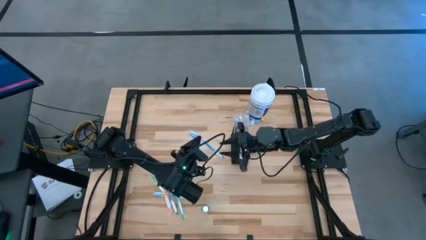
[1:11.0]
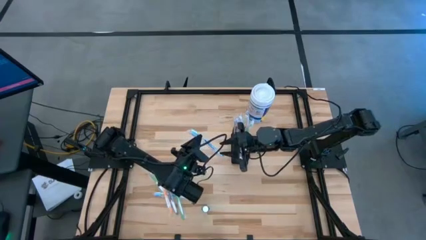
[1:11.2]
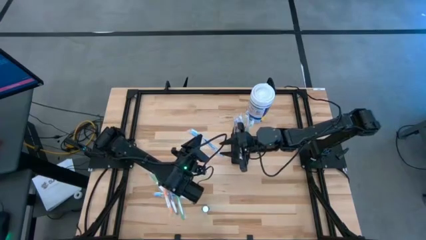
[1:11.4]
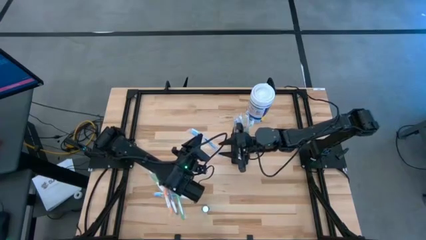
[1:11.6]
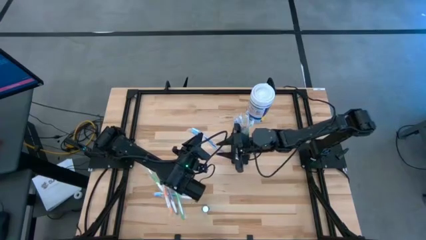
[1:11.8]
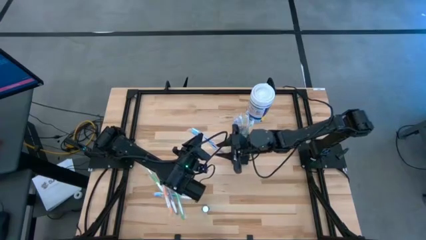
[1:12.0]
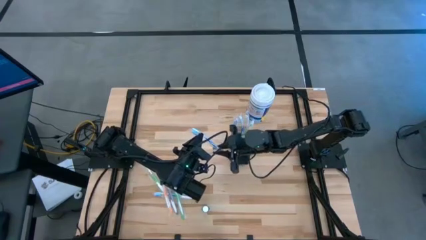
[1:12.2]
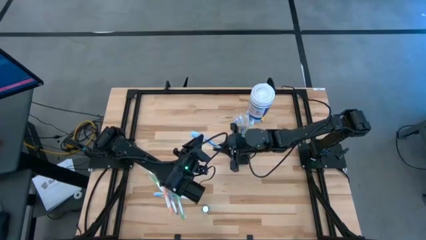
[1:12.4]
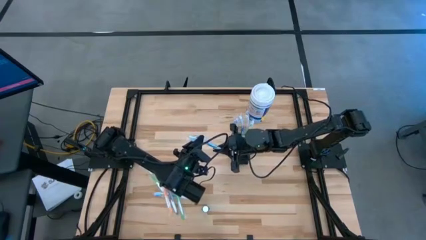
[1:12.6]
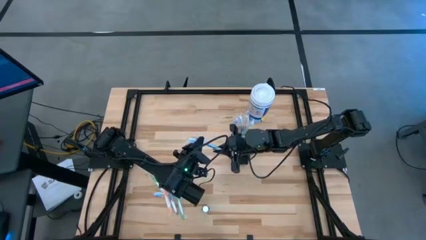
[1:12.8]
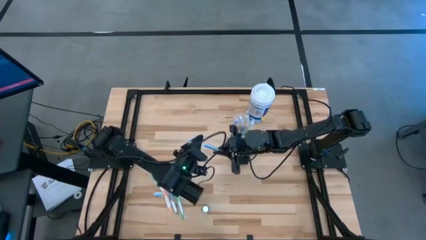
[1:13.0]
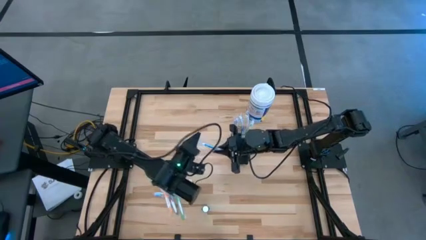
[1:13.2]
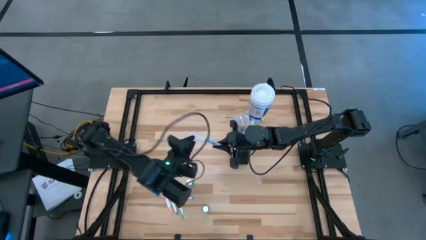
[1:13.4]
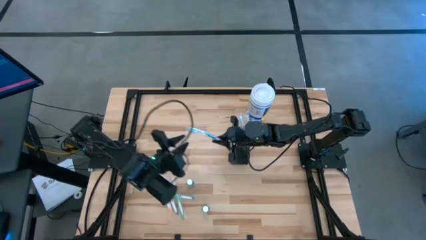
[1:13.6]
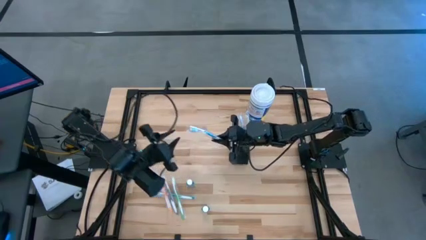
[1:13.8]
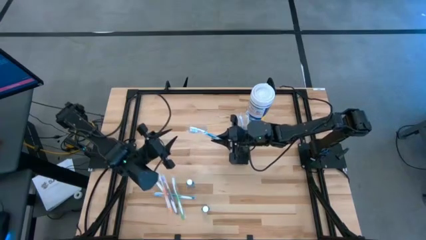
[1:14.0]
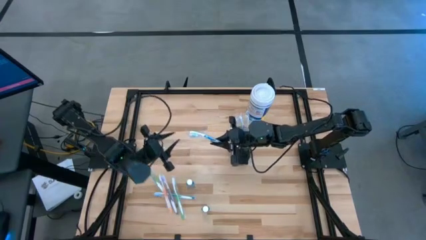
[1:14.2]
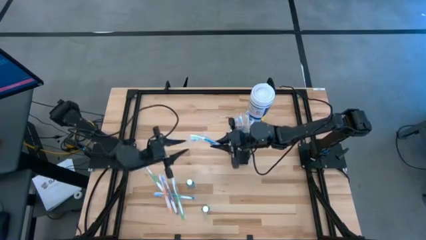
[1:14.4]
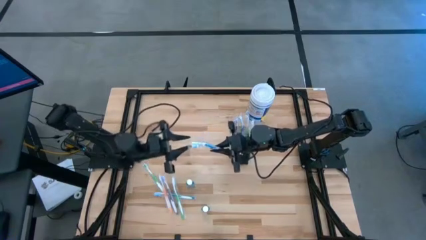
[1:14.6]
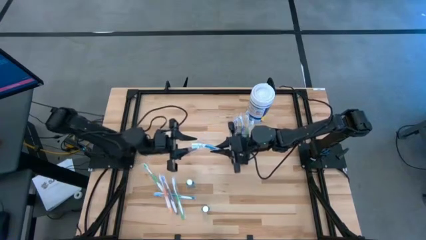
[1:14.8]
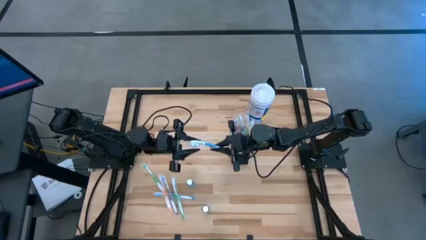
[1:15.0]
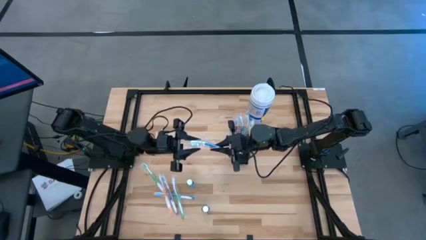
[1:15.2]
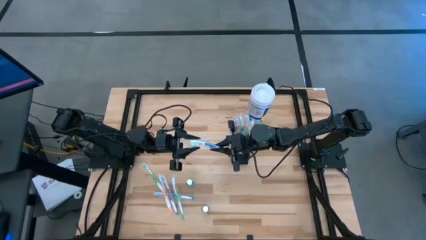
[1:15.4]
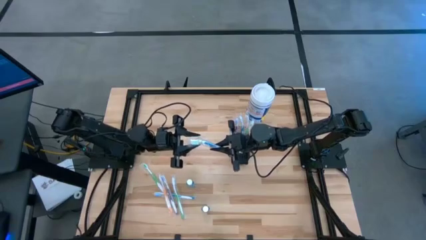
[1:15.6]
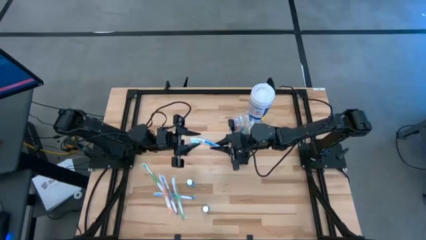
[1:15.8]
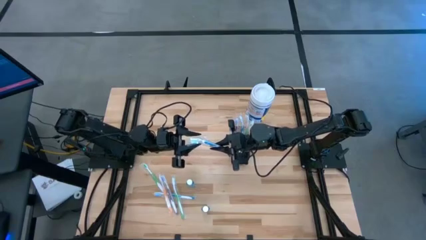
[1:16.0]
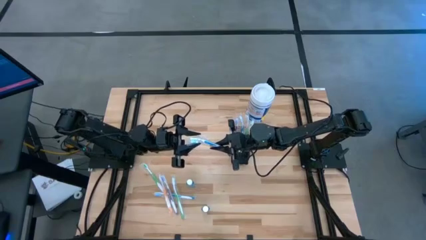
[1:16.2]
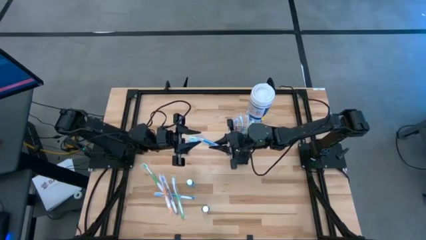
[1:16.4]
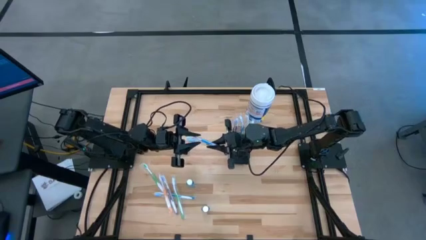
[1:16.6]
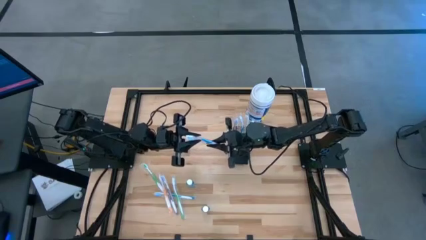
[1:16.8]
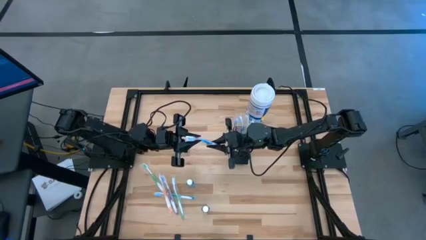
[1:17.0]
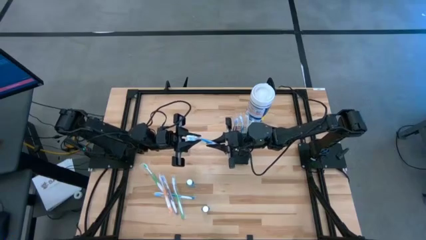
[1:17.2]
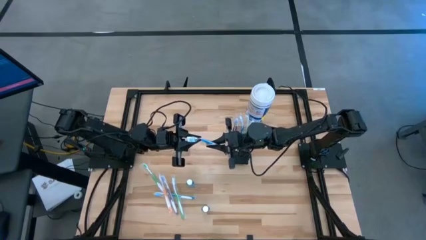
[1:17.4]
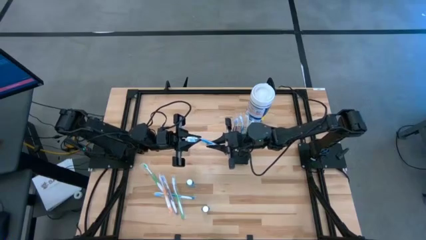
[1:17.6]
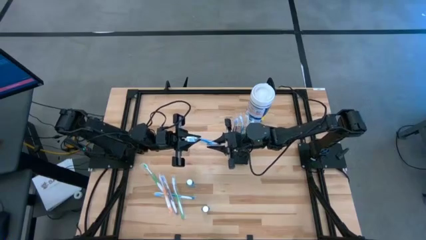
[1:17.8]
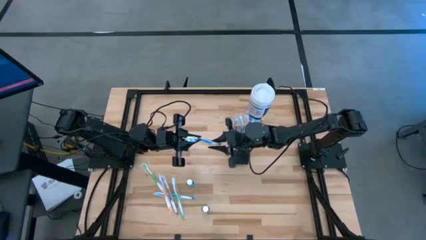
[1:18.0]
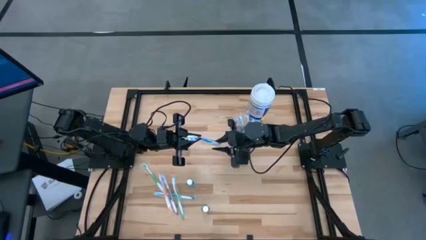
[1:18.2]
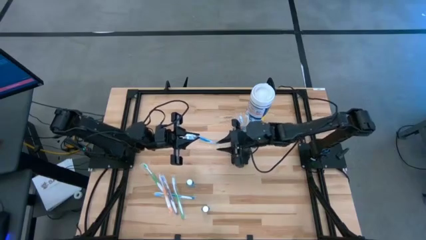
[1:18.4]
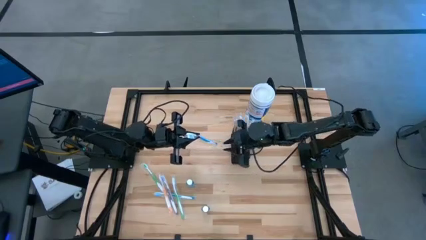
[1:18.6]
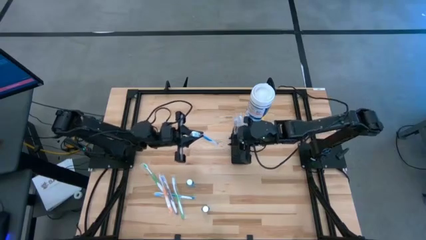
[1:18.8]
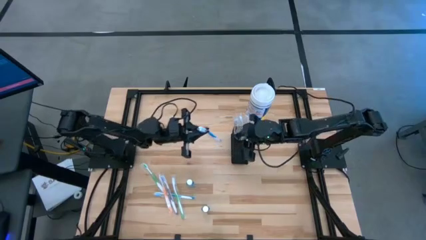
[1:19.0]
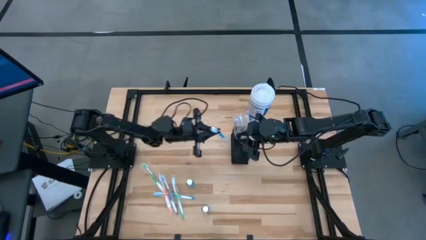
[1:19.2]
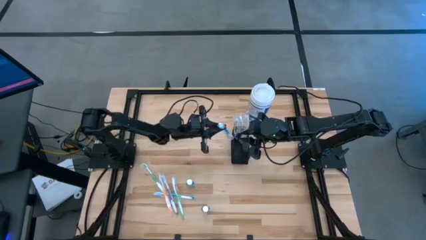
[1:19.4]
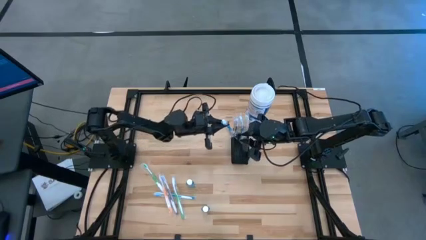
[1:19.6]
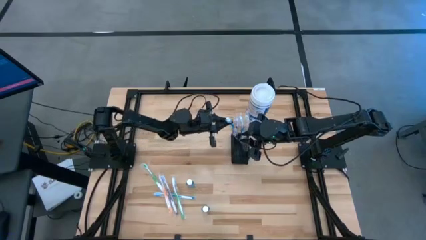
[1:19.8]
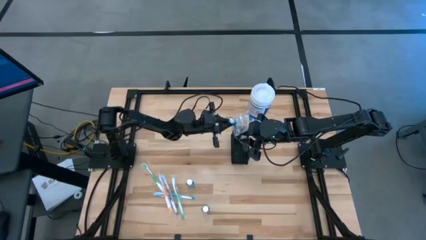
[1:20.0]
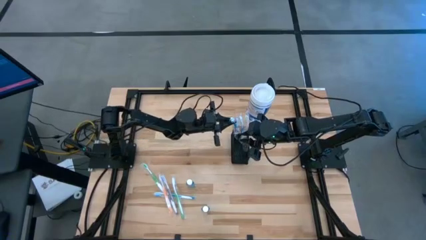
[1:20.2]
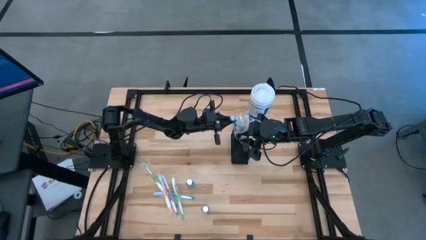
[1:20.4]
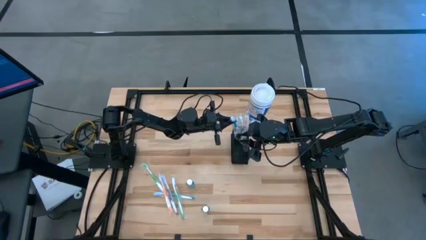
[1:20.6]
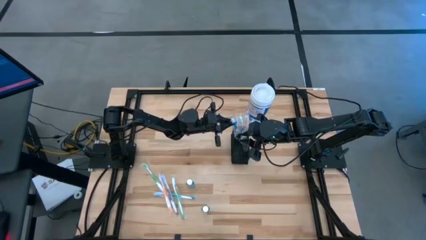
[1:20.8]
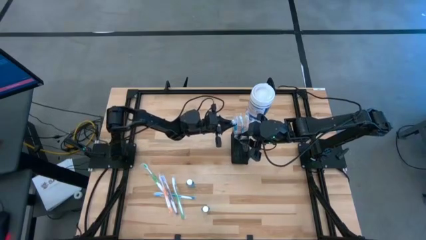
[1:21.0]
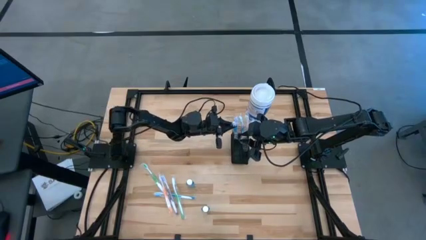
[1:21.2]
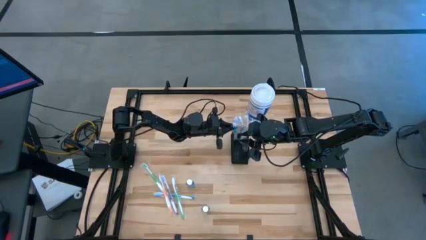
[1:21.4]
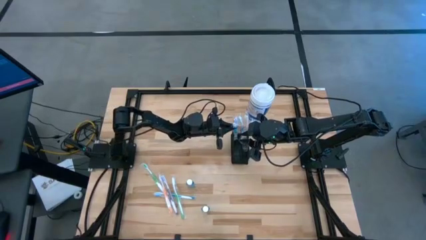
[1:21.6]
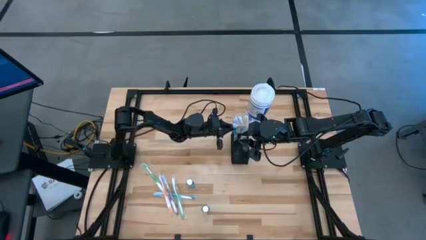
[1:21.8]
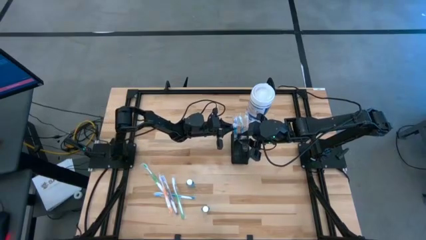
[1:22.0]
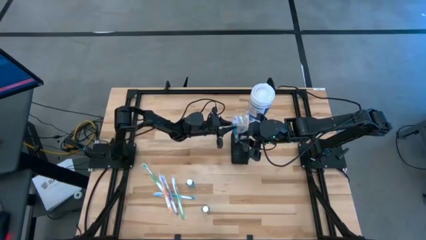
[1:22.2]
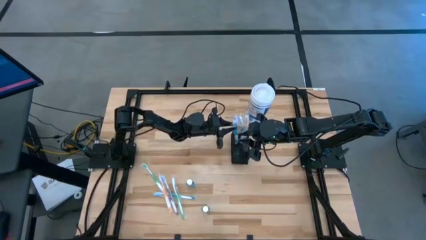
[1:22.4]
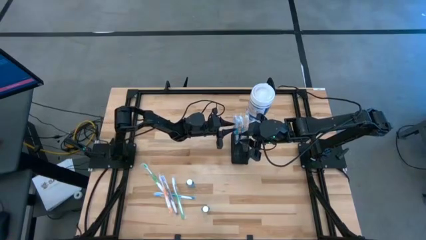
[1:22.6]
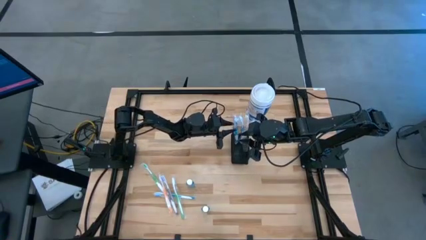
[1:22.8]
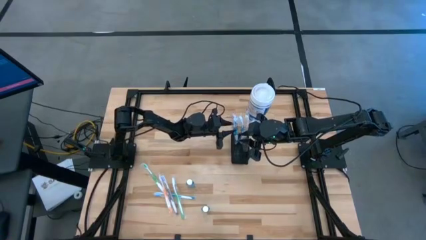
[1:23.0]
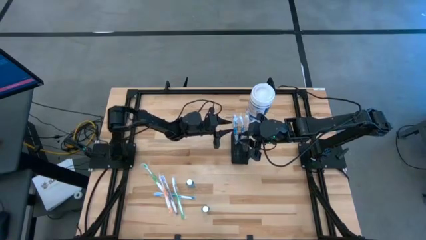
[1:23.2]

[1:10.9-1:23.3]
Task: Pick & Place toothbrushing station
Put the top blue toothbrush into the wire mesh organizer

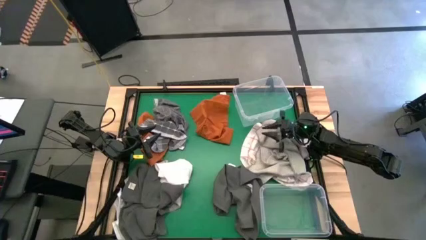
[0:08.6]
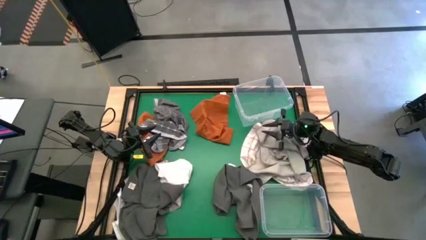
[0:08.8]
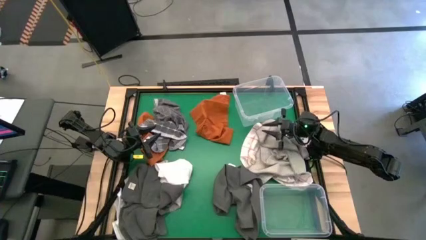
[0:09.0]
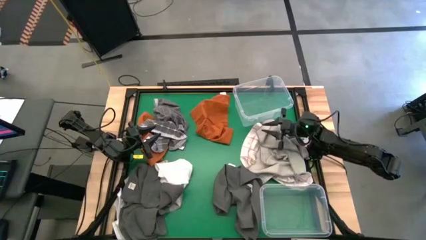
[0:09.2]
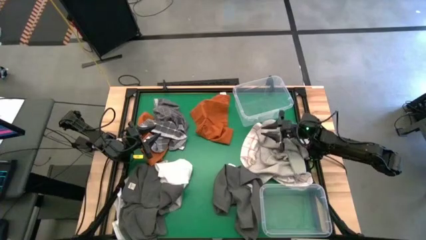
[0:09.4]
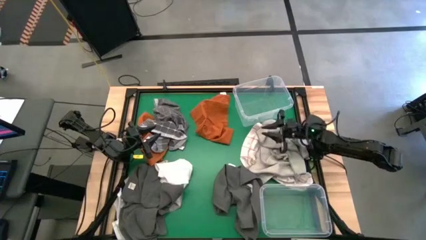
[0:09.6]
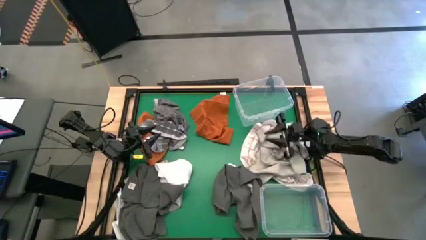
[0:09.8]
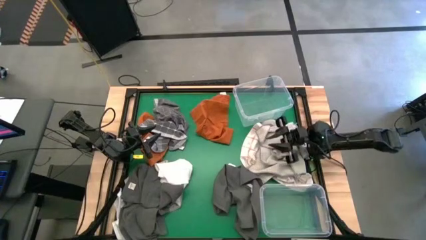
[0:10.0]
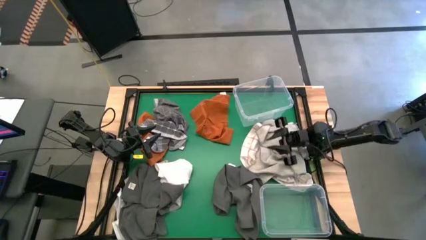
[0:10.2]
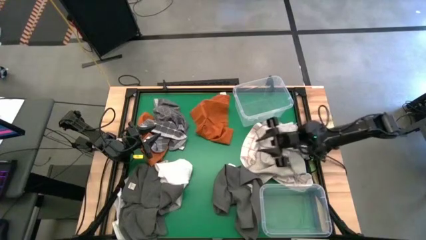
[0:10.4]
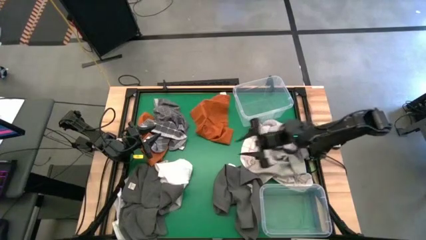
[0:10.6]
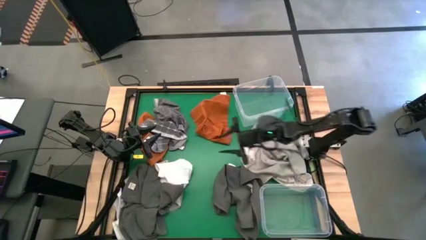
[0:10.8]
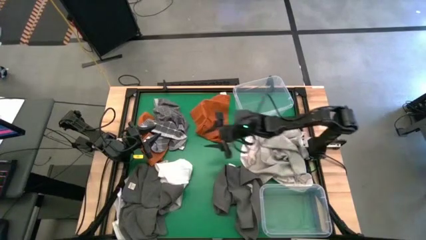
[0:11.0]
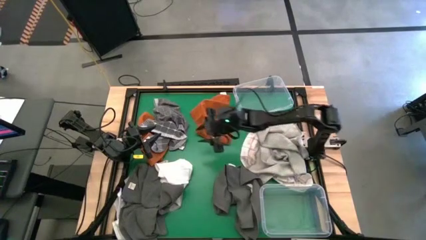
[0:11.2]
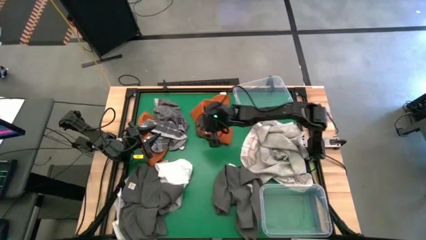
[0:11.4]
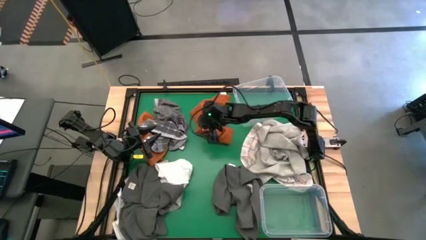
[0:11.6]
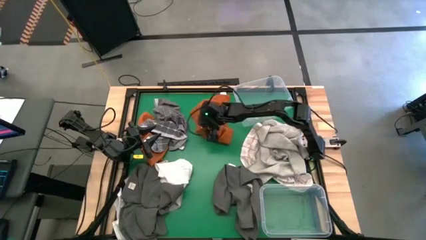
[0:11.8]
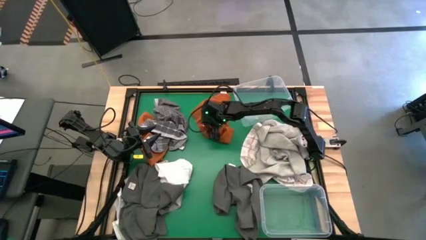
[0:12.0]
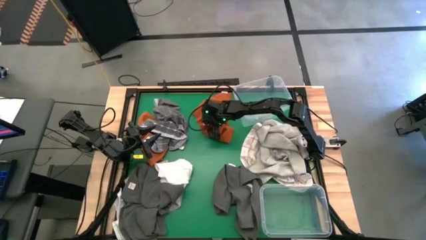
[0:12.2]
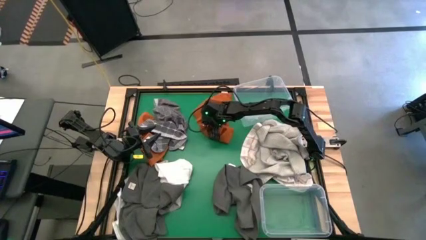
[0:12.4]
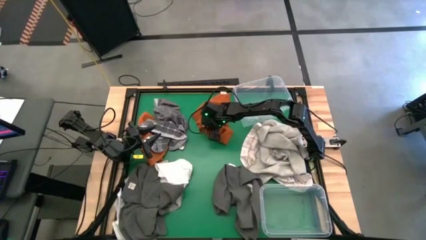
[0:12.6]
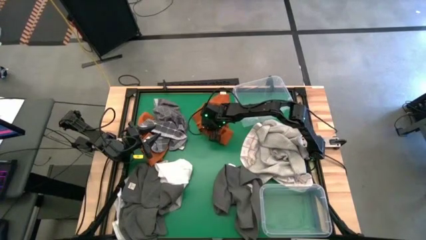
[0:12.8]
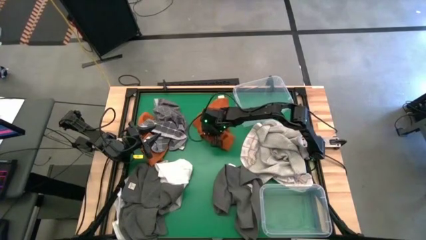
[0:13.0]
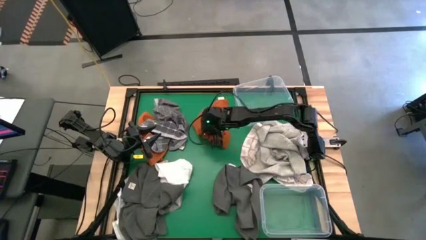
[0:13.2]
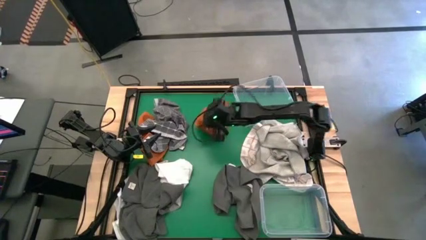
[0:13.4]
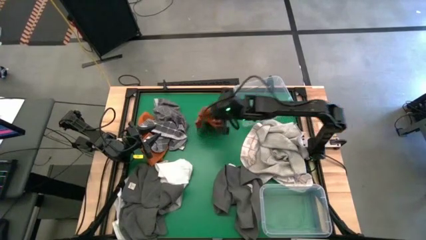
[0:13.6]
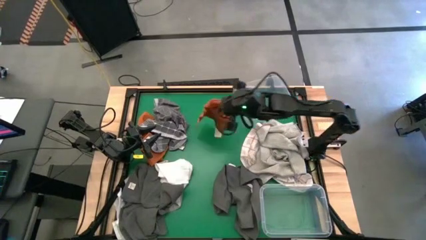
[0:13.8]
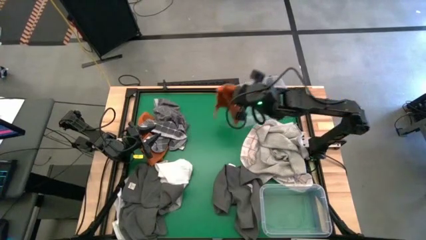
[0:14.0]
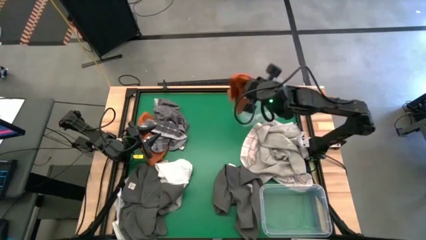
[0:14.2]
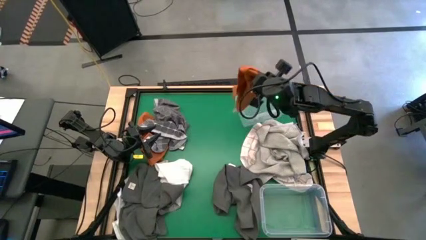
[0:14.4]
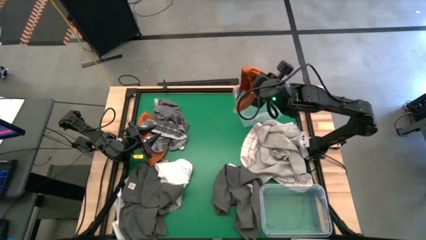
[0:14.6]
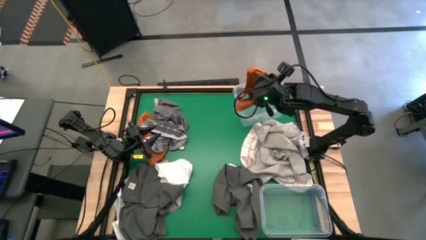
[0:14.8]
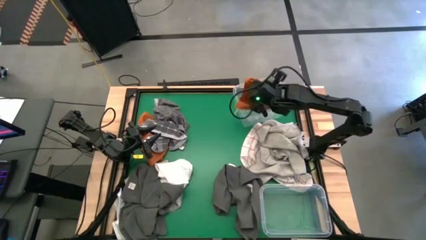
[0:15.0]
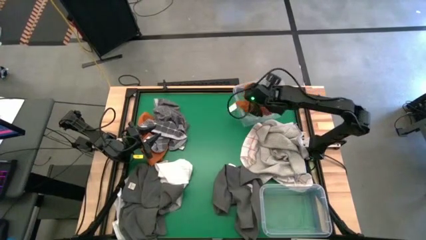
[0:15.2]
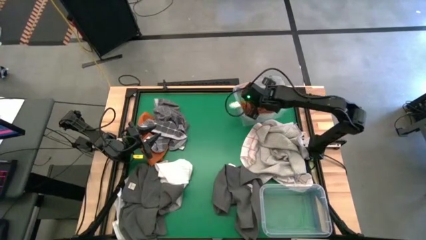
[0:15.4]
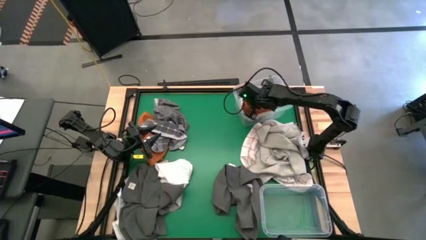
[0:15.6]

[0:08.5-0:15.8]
Task: Sort towels by color in basket
Put the orange towel into the top transparent bin
